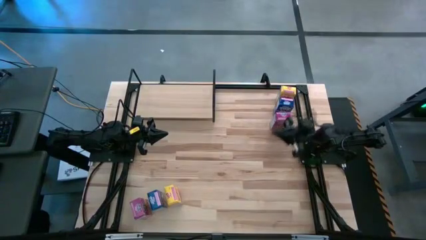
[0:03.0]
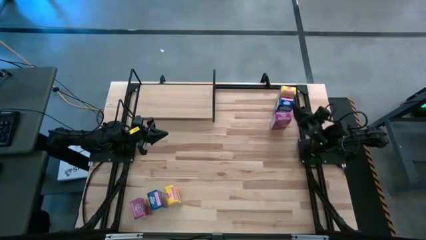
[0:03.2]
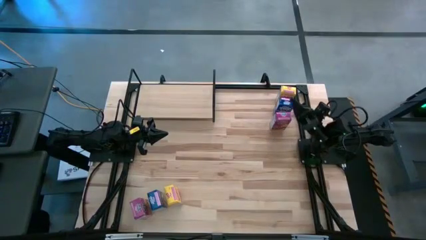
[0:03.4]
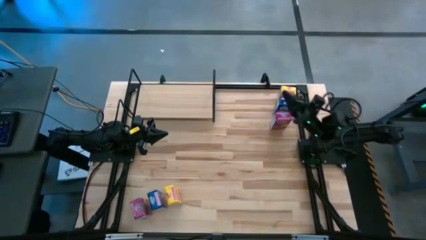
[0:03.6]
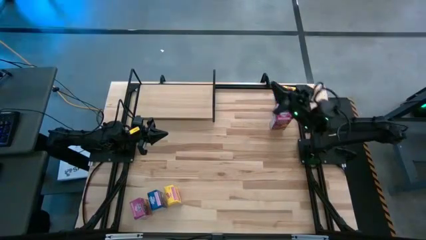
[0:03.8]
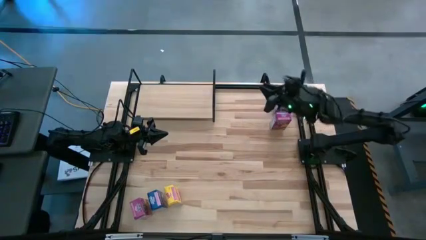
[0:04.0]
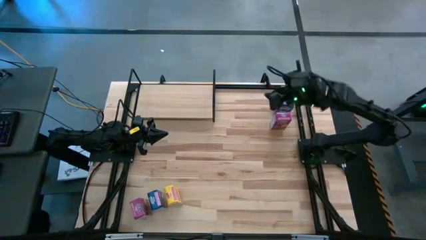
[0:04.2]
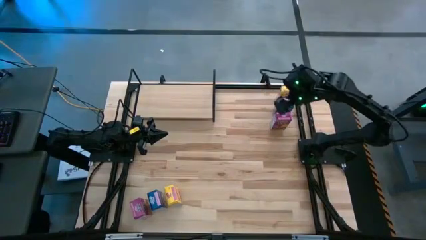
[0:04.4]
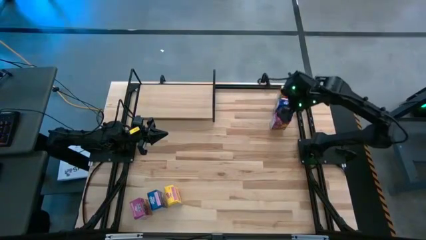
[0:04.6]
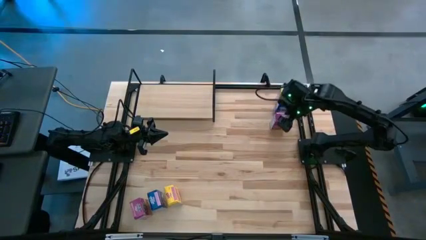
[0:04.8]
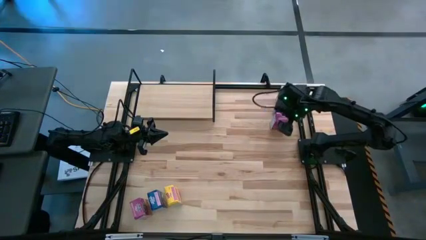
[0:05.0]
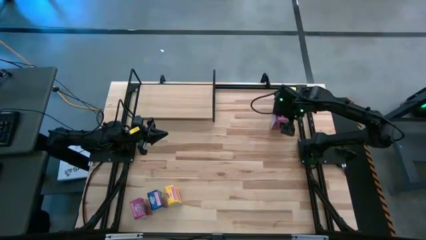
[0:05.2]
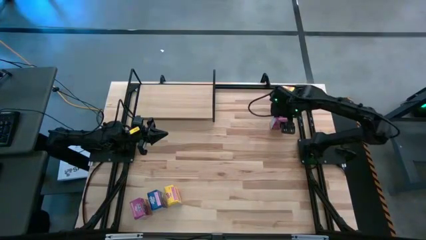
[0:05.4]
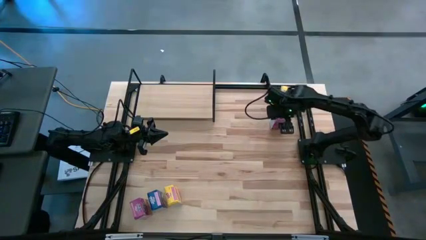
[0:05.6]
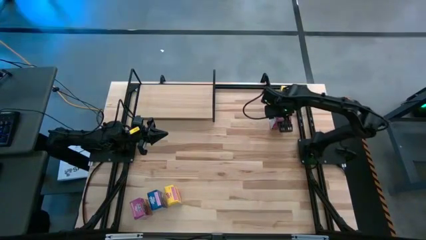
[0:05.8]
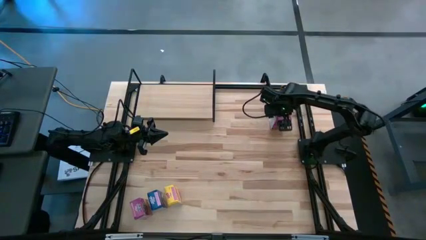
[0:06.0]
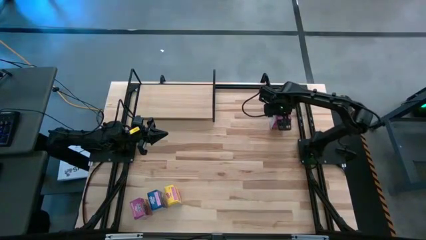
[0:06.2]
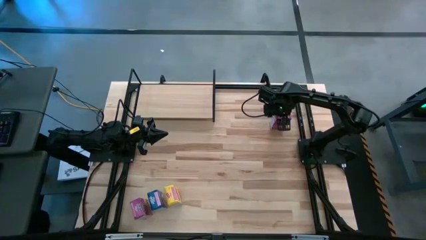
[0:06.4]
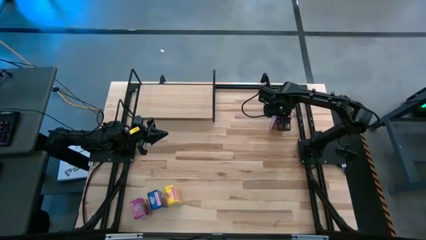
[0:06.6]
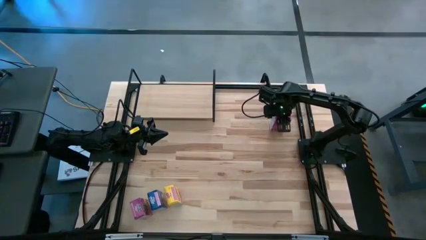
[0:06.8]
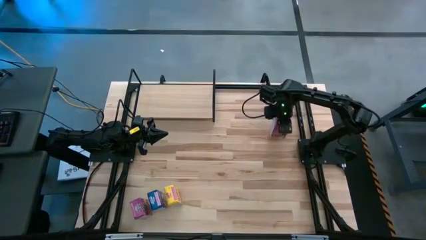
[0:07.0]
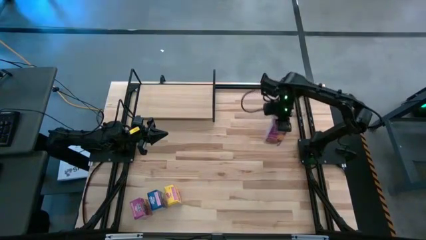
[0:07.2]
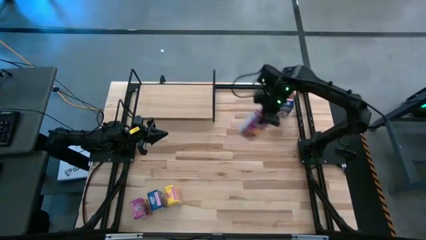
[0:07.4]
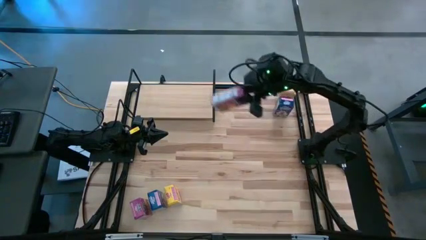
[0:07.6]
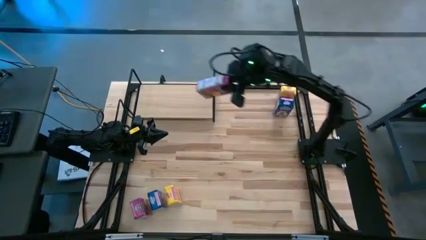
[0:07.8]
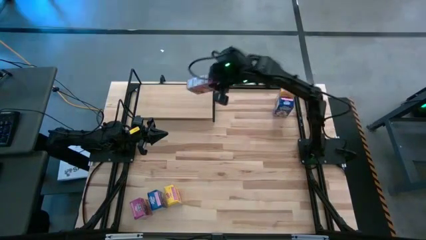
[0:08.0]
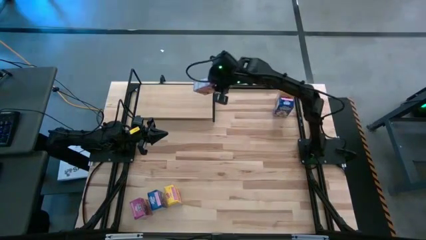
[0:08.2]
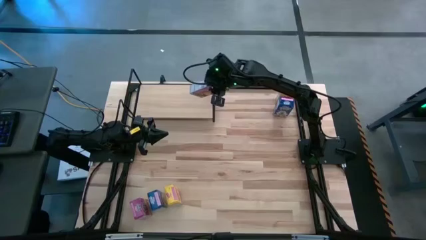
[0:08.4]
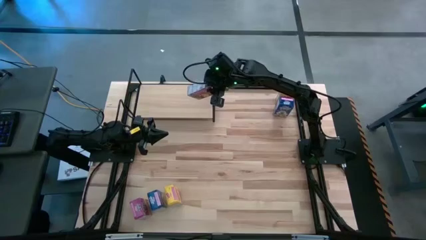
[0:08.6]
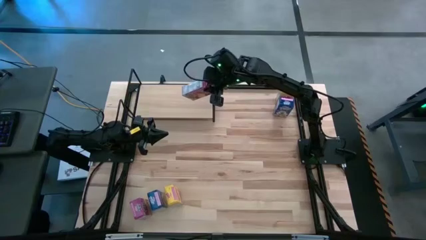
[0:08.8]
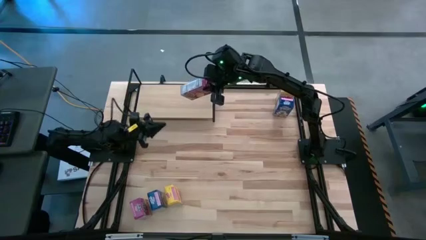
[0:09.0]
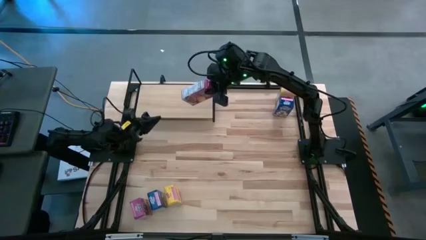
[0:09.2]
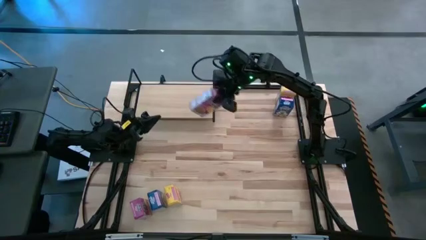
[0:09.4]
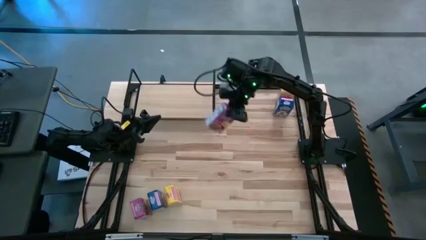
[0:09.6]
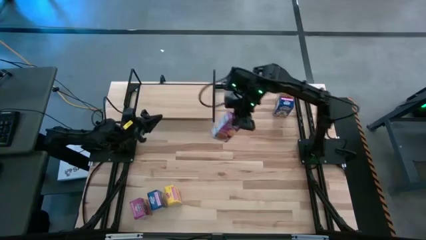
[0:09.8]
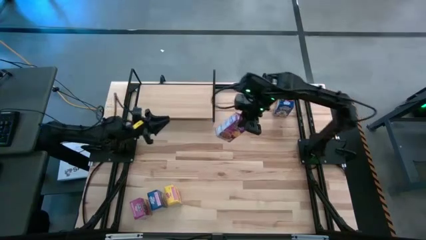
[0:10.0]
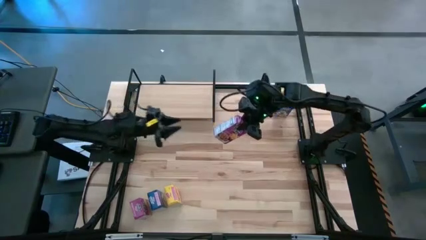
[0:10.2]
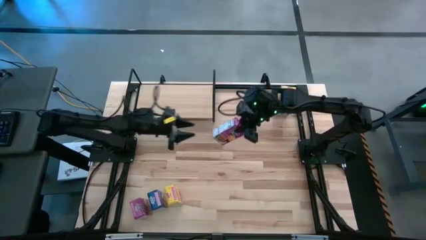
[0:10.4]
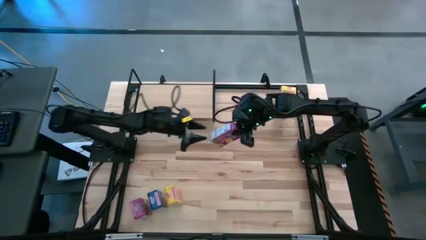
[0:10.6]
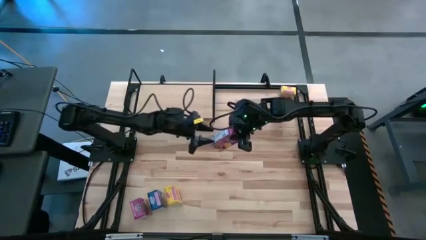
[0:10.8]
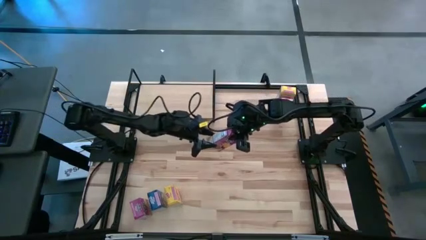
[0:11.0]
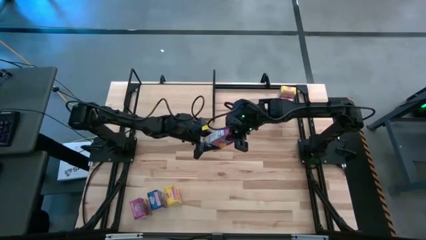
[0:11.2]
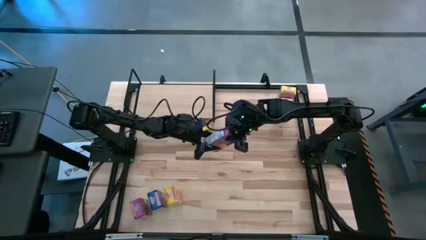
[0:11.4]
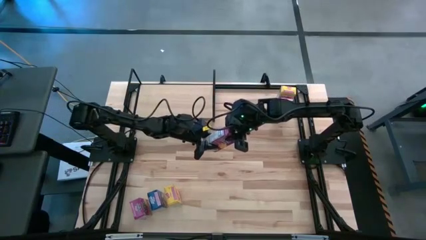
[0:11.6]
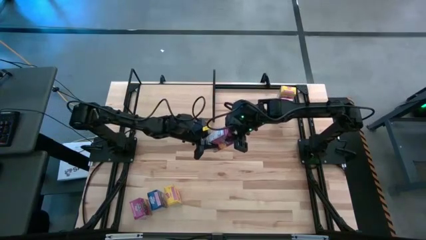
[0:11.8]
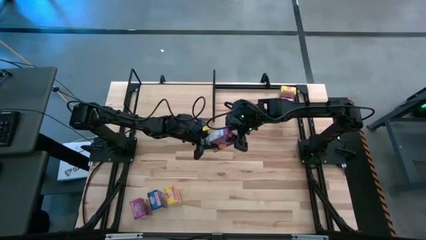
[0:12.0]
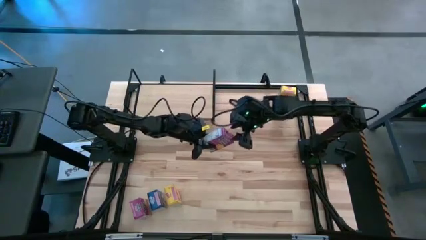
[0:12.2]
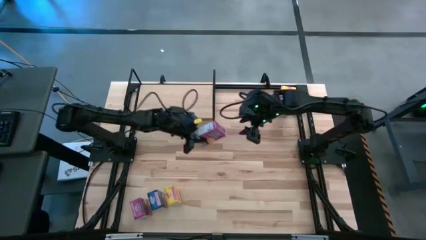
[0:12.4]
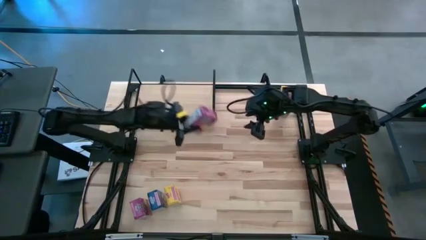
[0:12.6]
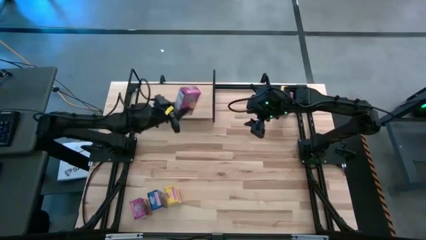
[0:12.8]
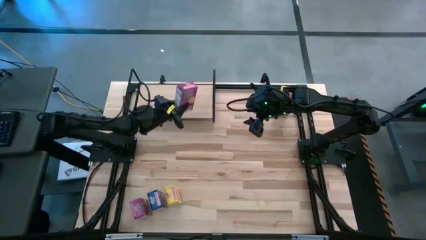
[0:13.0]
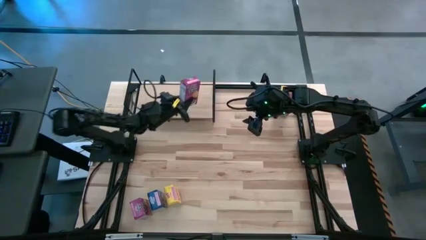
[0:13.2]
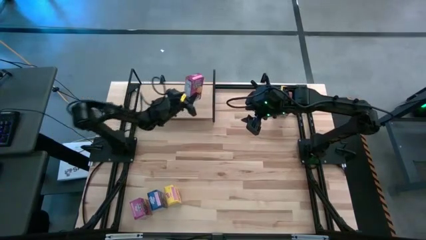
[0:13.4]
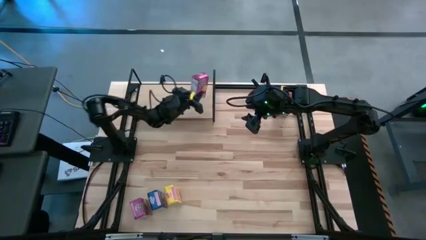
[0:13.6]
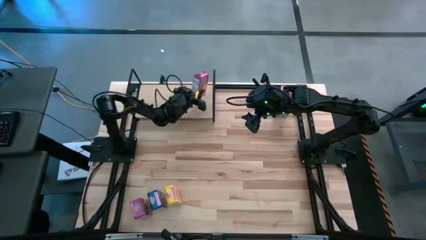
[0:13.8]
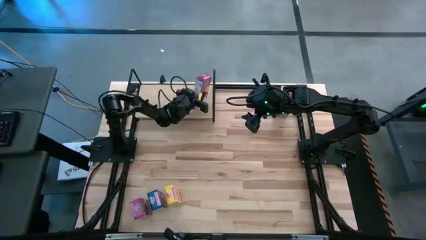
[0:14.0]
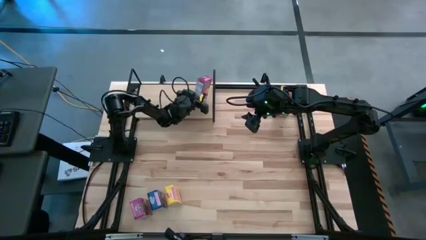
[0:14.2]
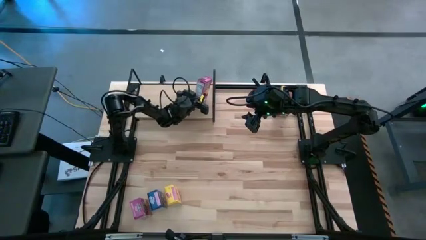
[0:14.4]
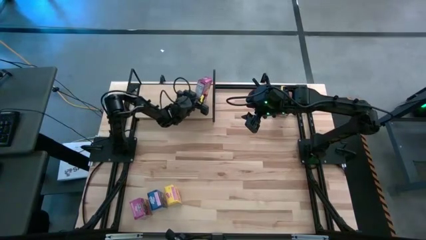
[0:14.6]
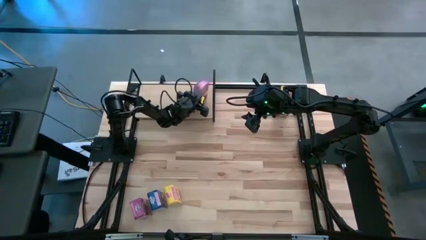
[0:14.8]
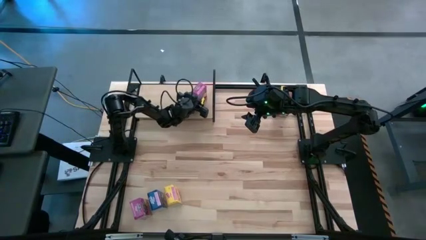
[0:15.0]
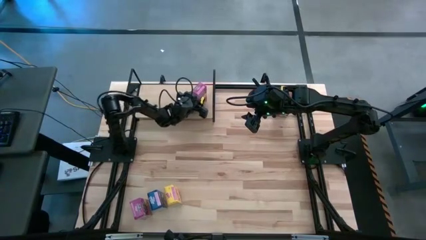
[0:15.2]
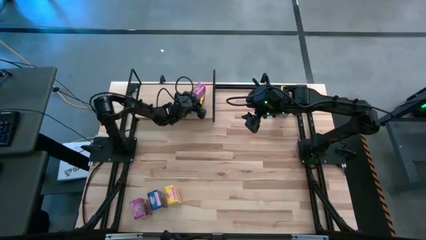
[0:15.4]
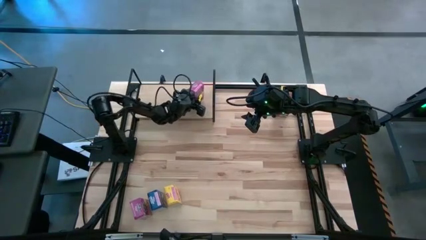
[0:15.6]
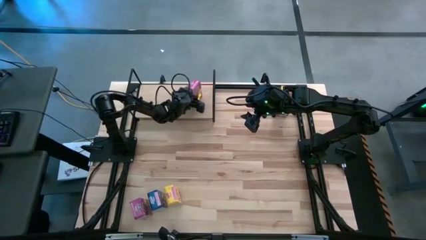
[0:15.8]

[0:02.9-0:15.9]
Task: Stack cereal on shelf
Put the top purple cereal box on the shelf
